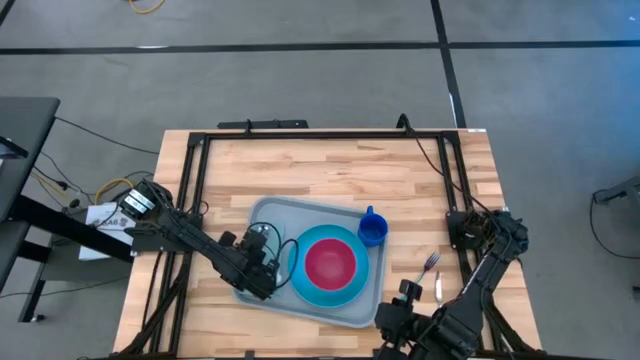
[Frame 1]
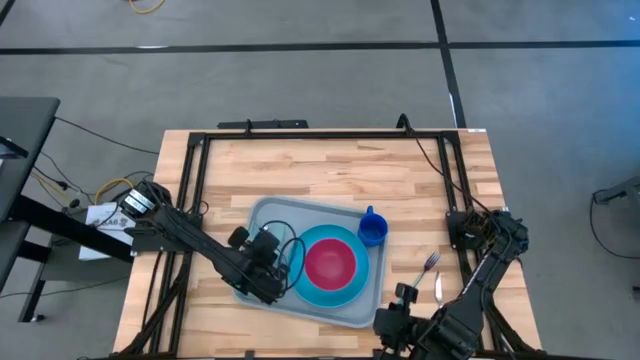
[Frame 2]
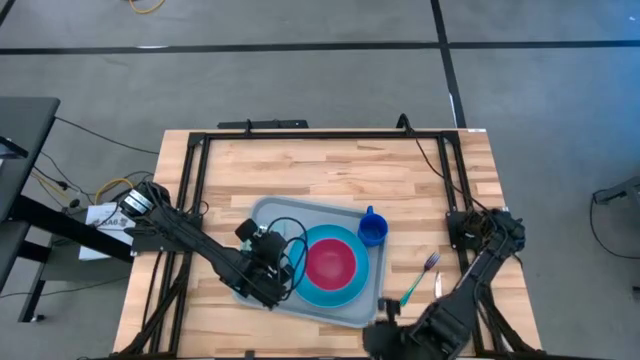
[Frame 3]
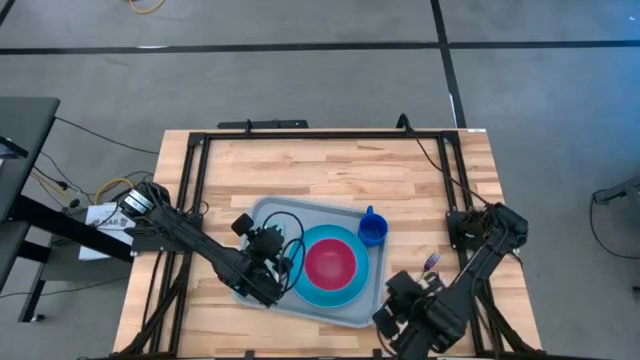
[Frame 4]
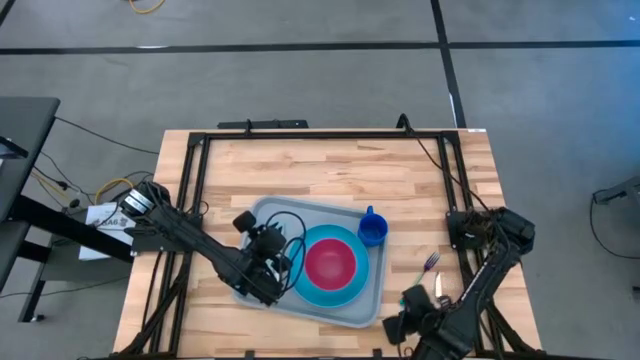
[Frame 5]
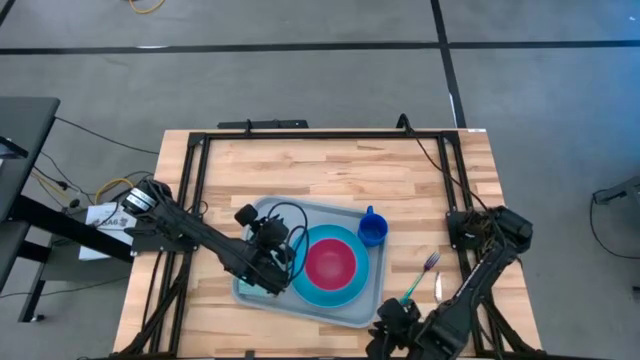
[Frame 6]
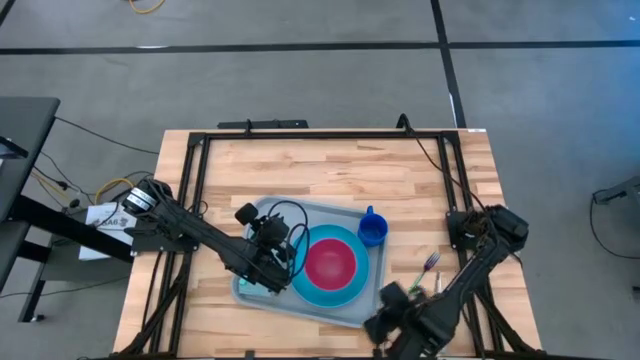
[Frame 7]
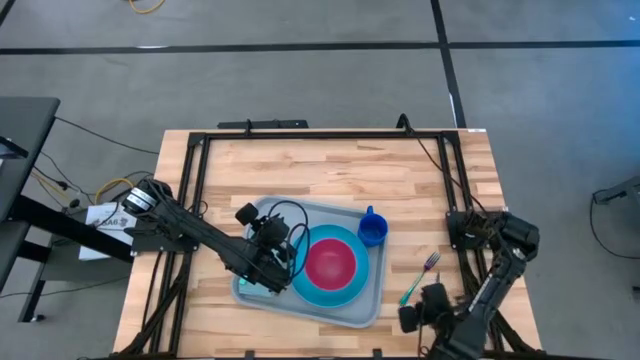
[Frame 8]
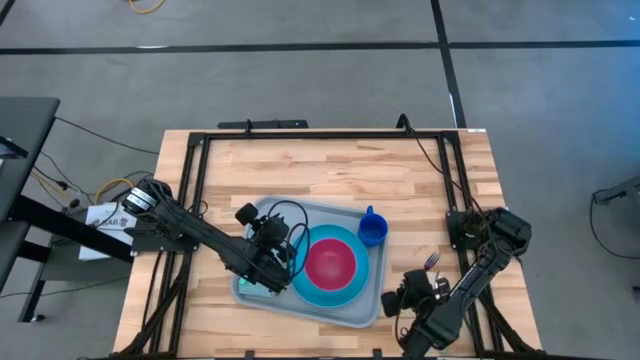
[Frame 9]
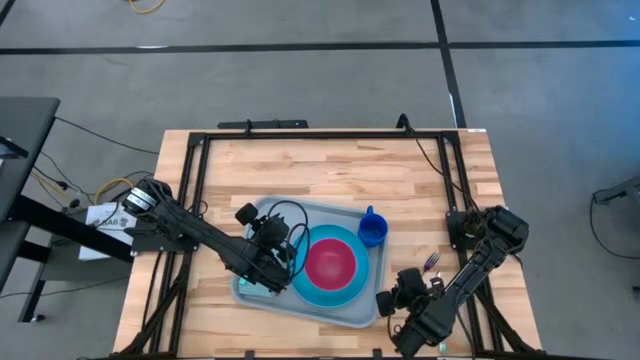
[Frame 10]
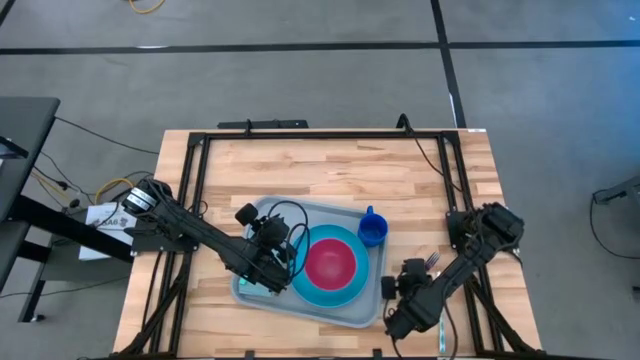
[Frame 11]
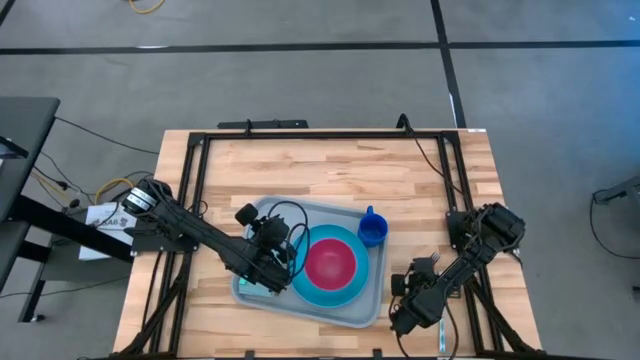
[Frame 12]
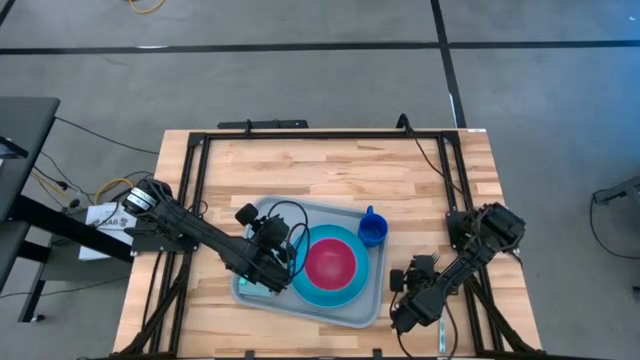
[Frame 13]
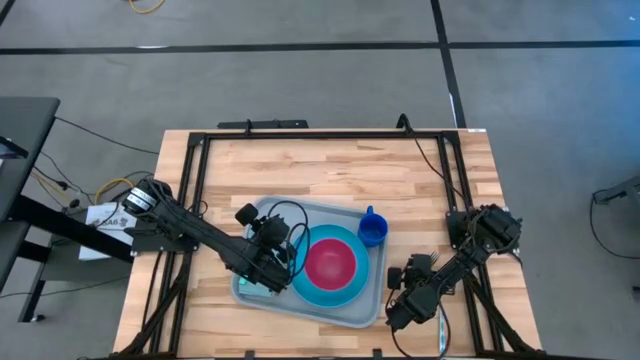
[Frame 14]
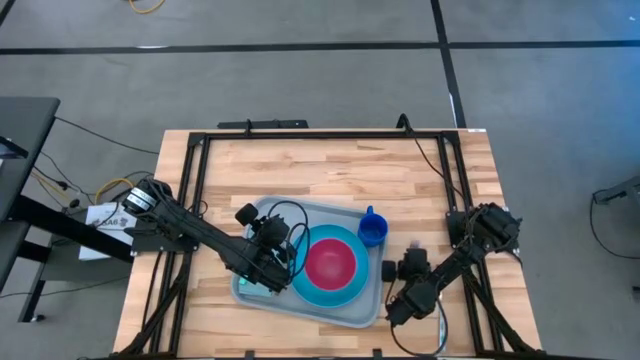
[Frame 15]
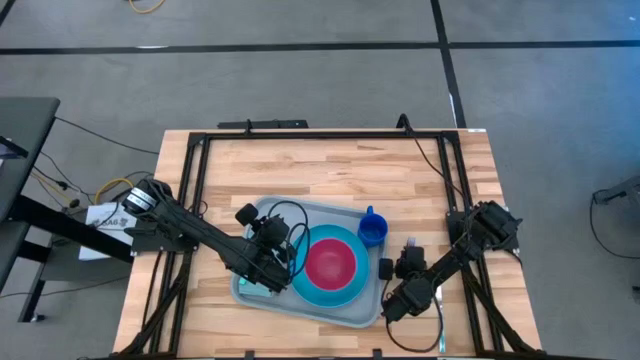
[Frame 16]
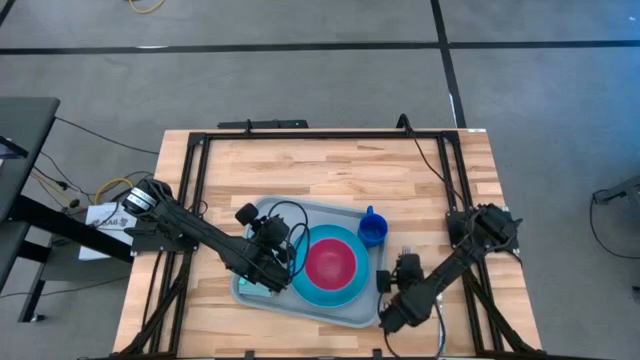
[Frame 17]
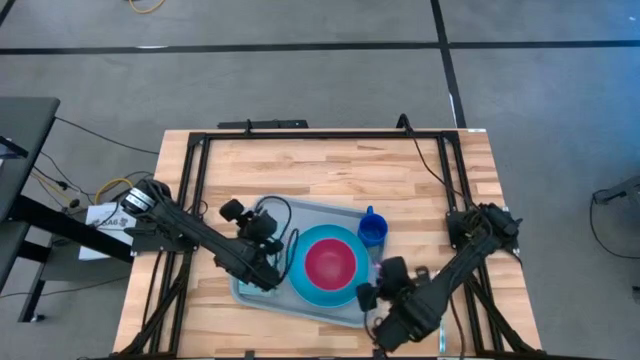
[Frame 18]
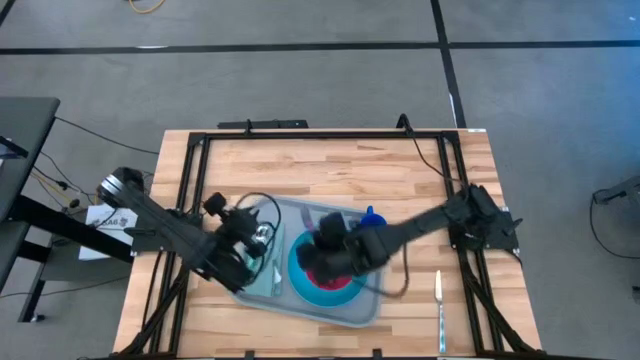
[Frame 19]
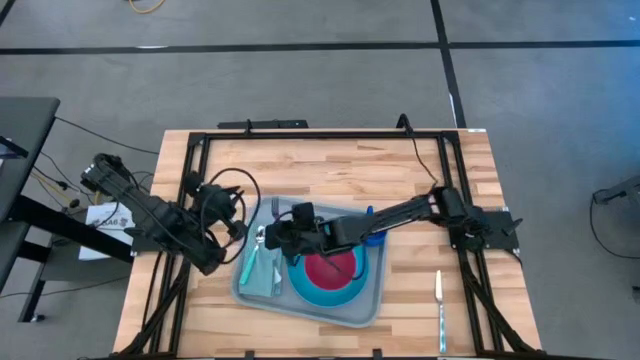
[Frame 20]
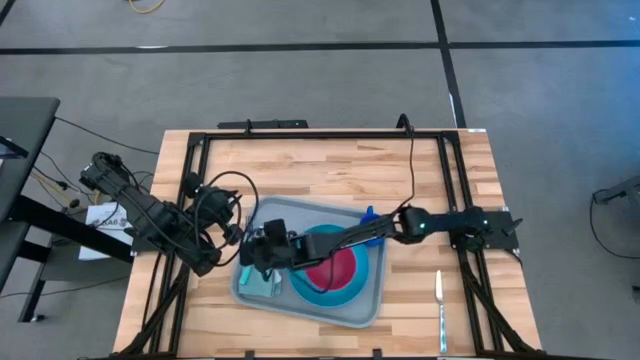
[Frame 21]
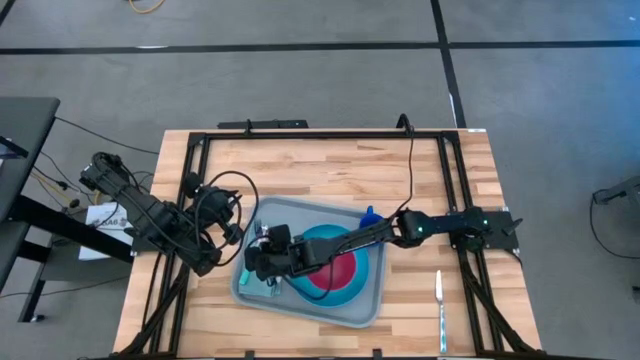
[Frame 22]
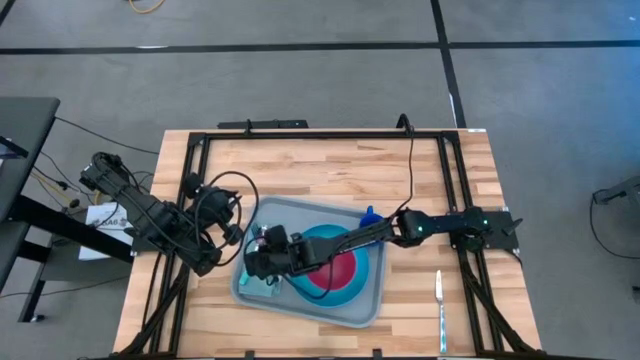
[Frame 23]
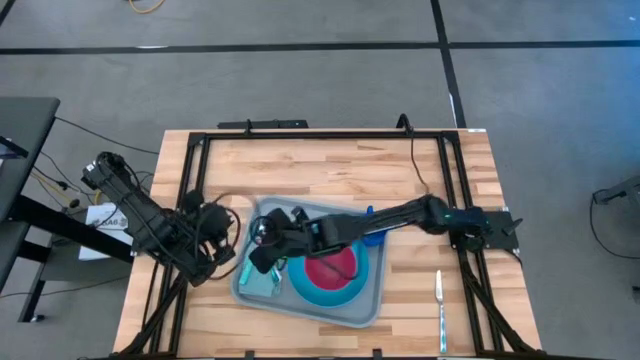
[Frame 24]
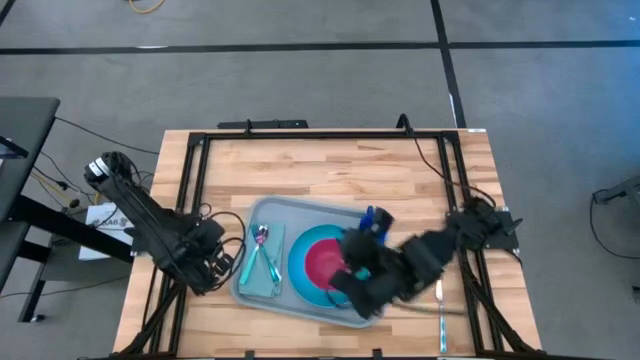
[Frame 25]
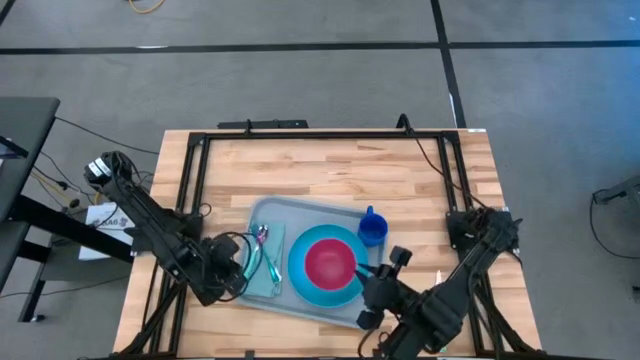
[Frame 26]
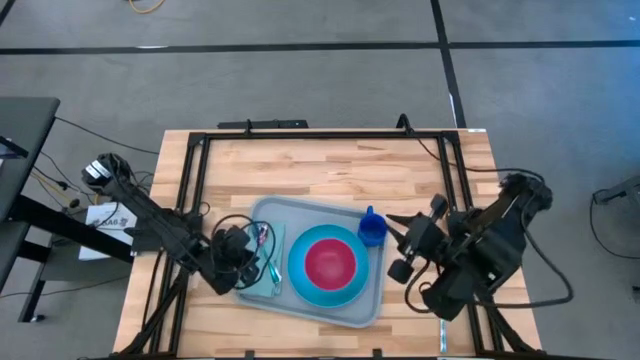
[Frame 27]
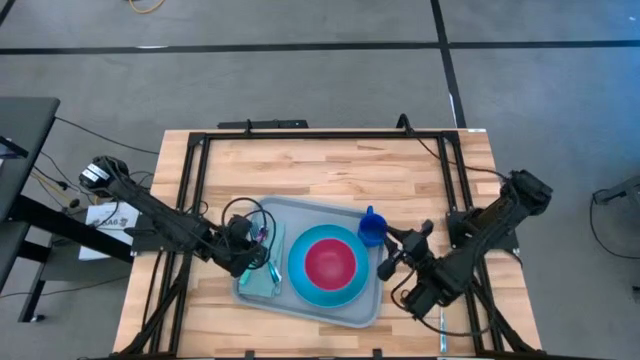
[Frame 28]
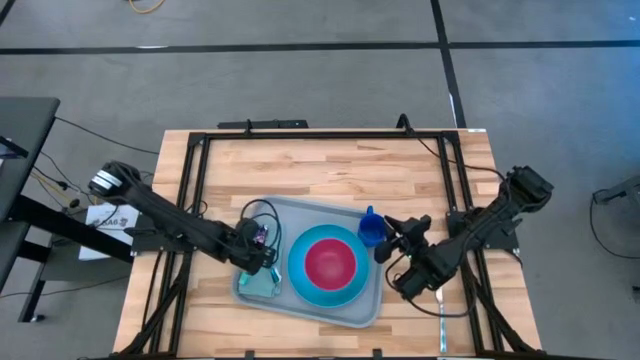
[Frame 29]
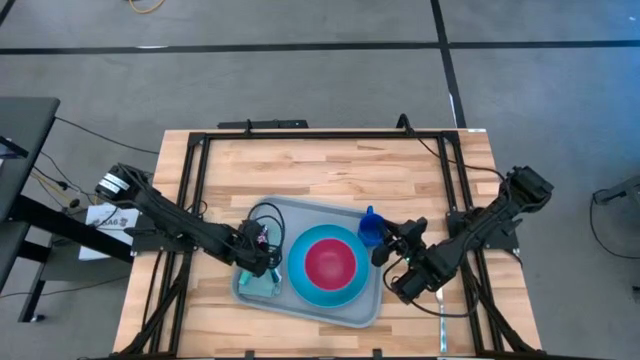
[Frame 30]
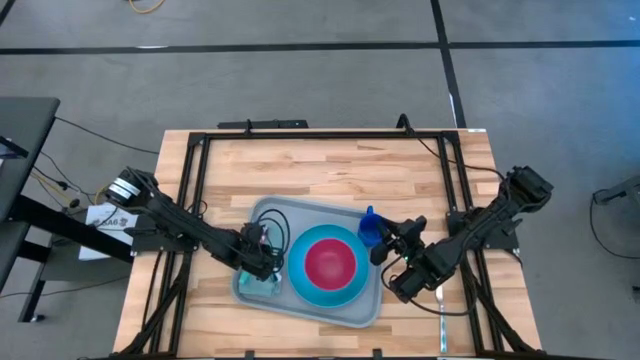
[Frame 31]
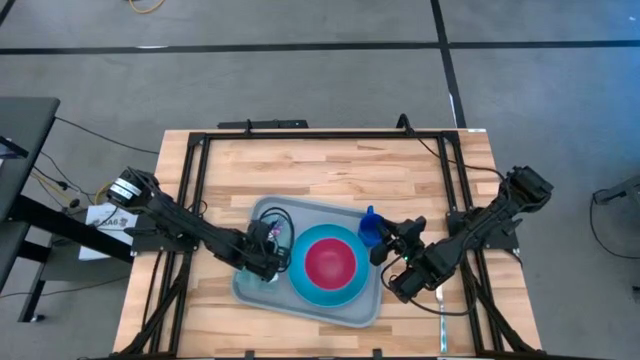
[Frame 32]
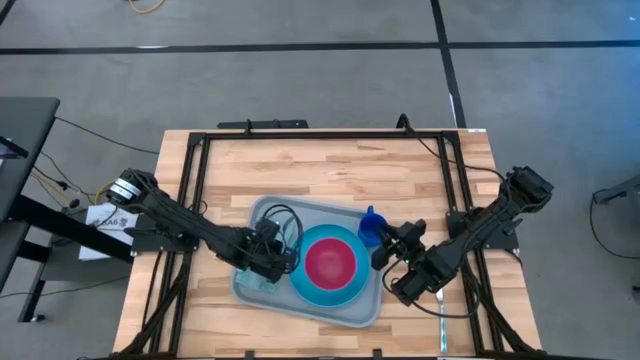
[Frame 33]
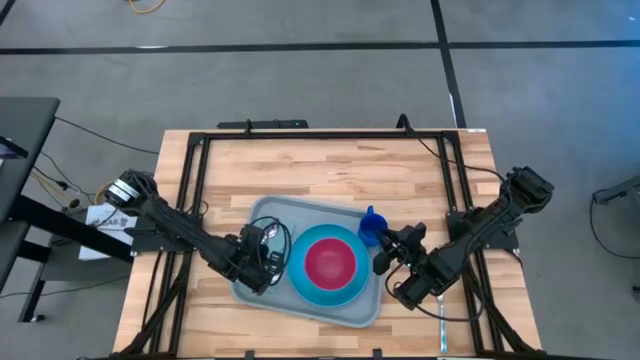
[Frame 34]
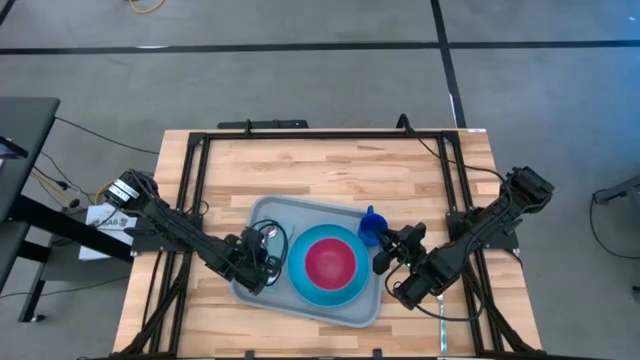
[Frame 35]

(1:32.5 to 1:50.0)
Task: Set up tray
Put the blue purple fork on top of the green table napkin to the right of the green spoon

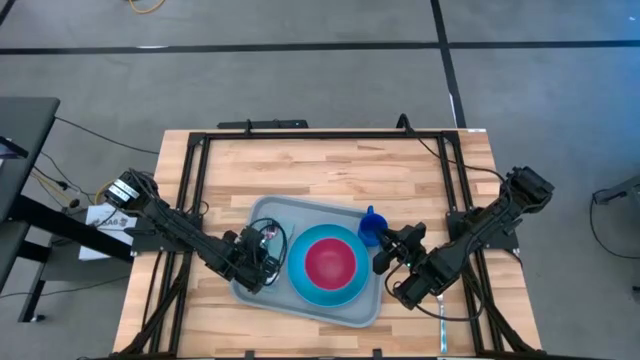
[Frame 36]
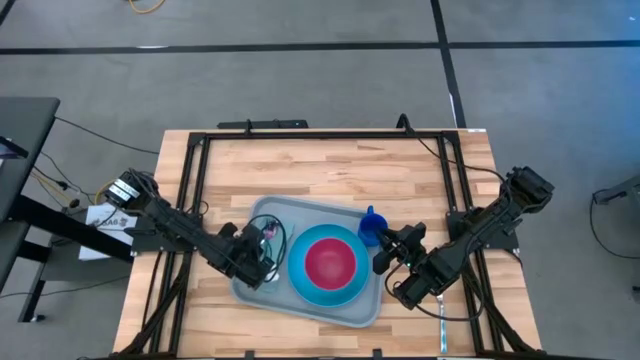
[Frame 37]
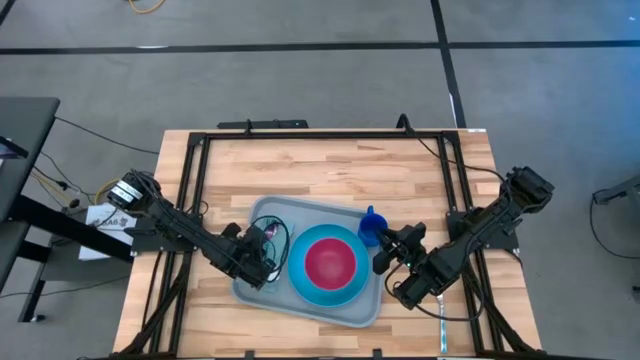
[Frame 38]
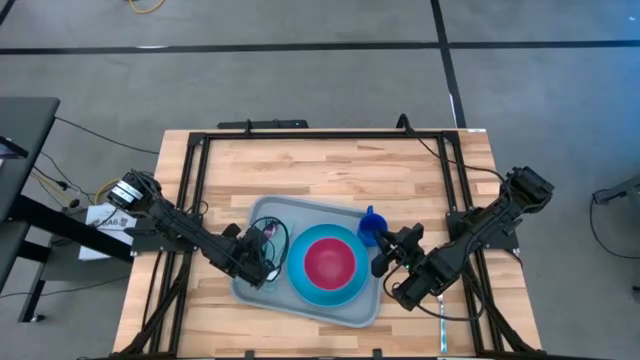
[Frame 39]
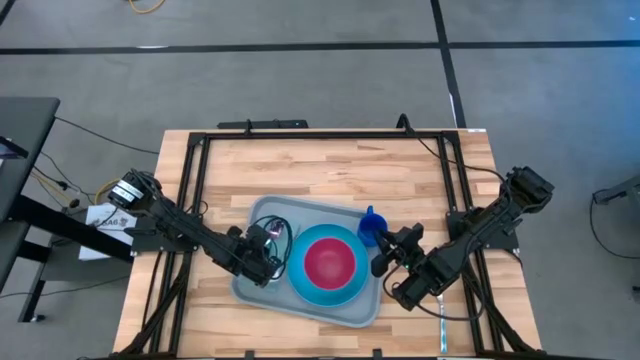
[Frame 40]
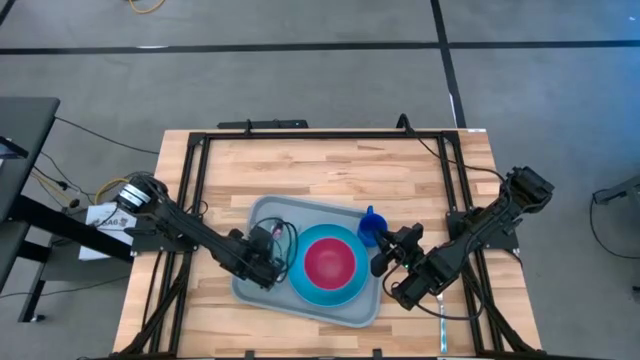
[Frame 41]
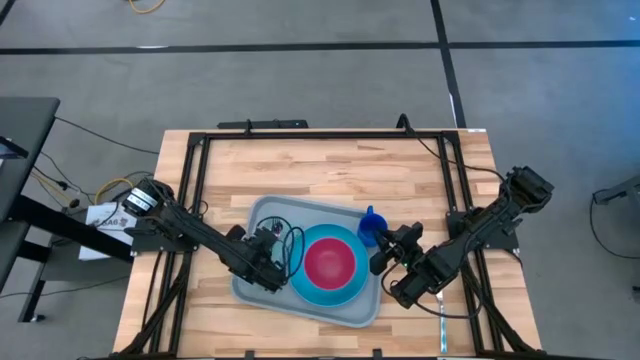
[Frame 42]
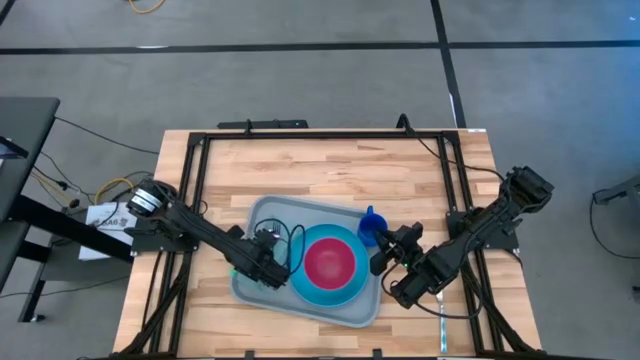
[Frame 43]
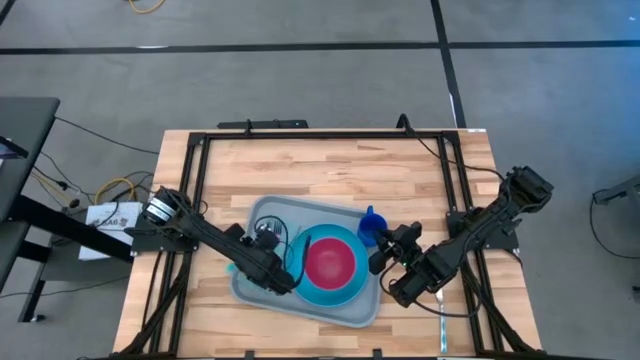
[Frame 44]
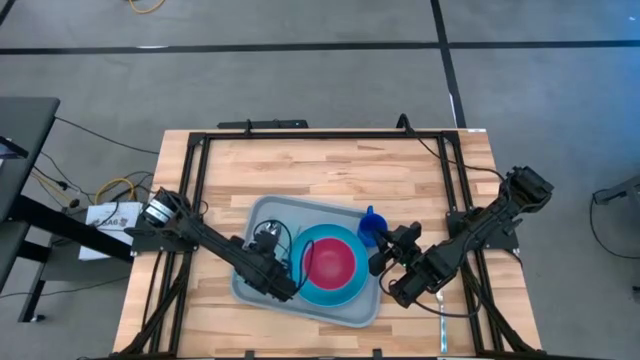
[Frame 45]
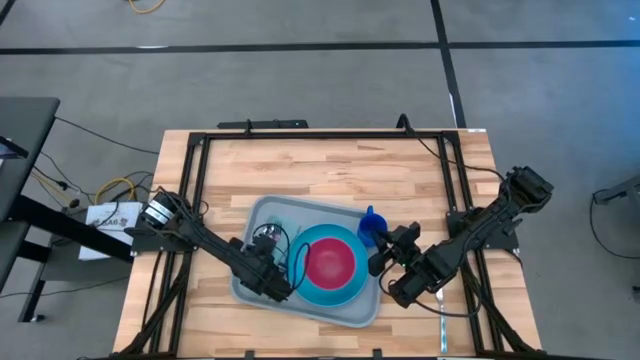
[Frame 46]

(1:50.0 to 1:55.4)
Adjust the green spoon on the green napkin
